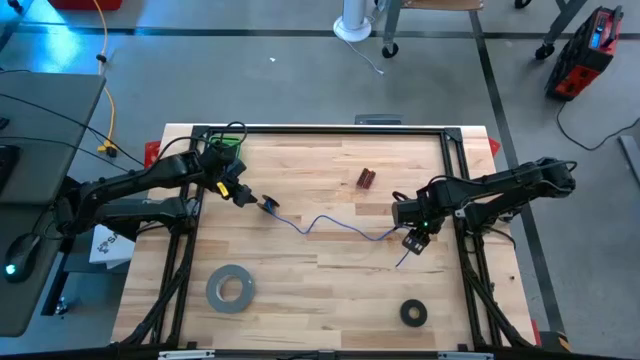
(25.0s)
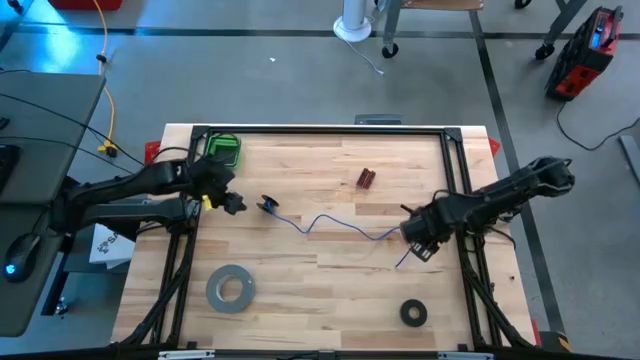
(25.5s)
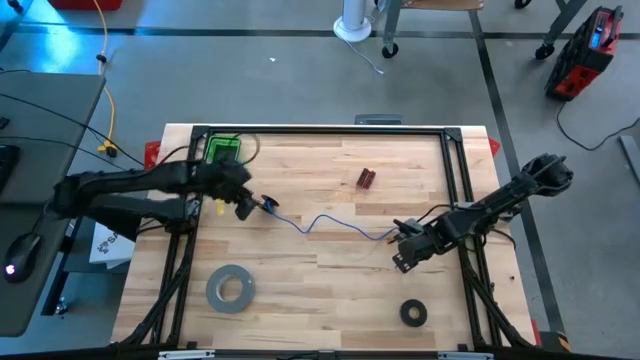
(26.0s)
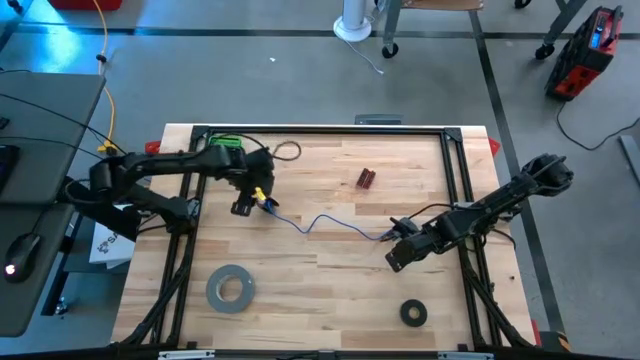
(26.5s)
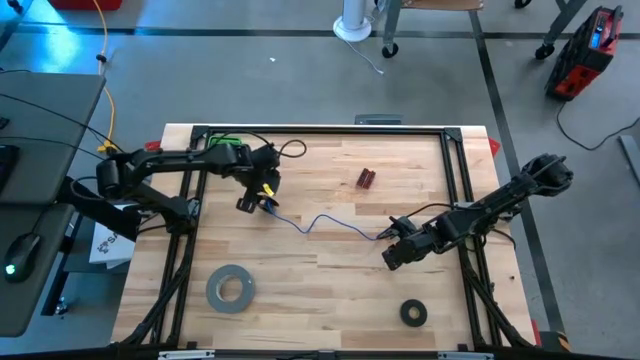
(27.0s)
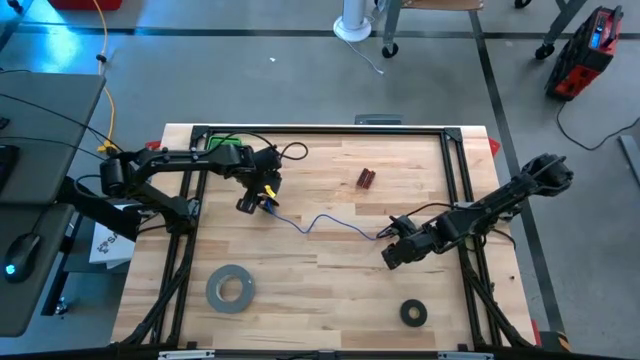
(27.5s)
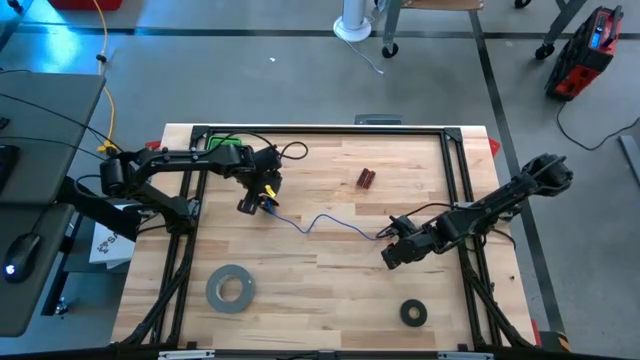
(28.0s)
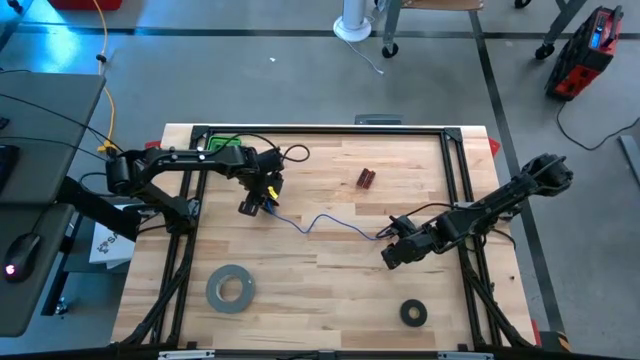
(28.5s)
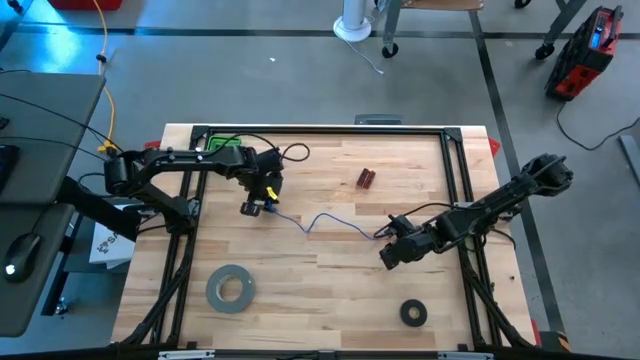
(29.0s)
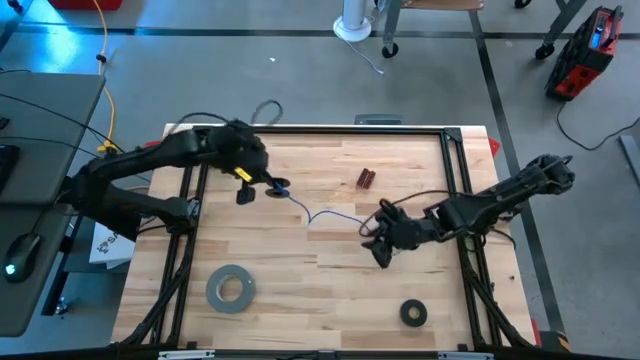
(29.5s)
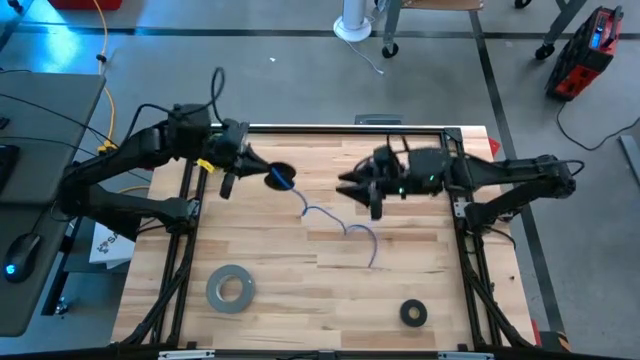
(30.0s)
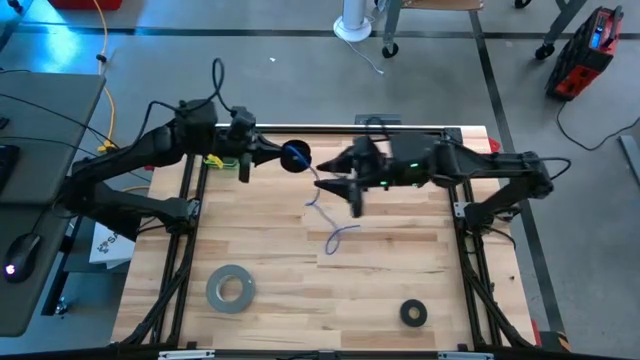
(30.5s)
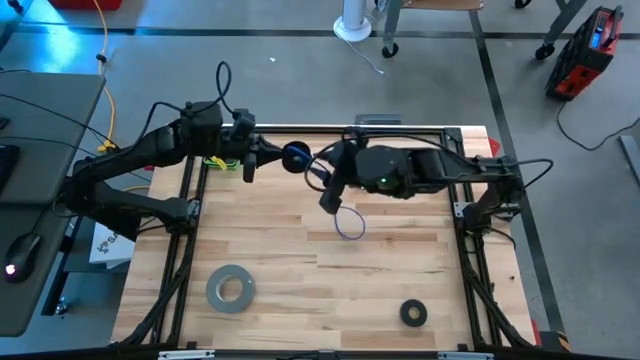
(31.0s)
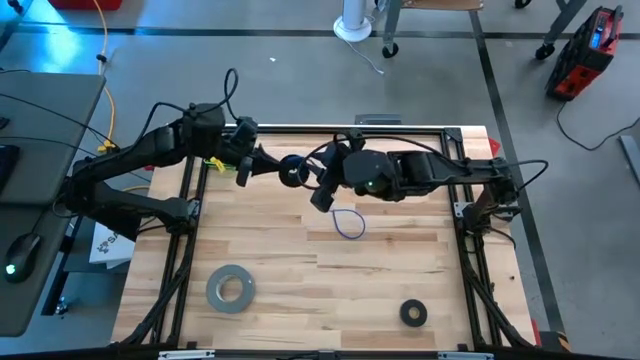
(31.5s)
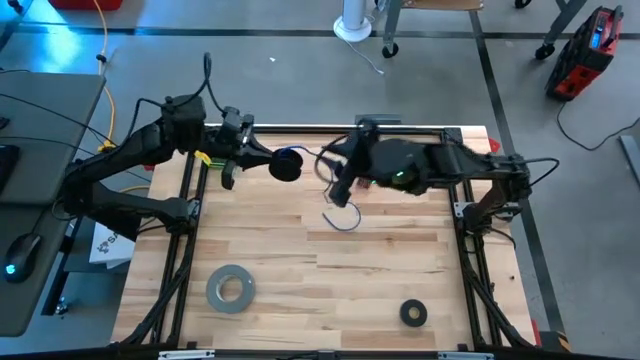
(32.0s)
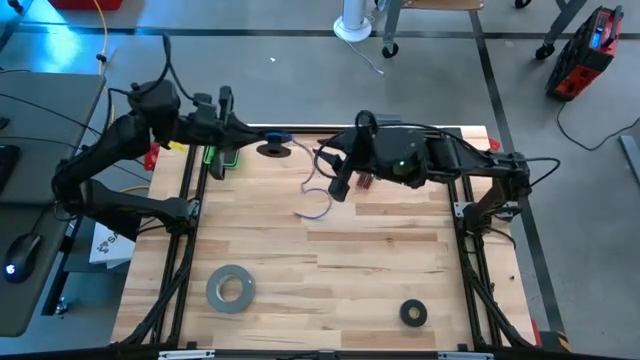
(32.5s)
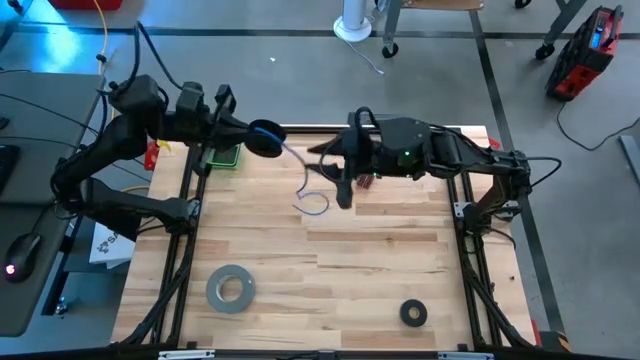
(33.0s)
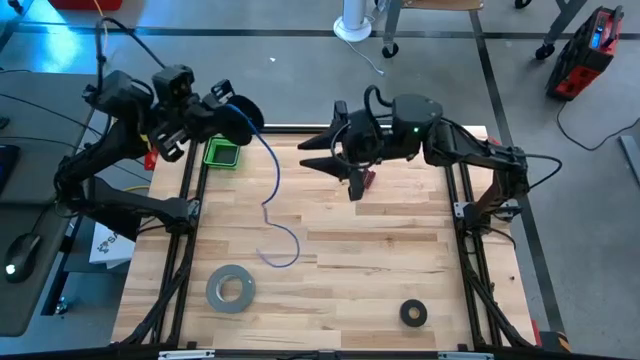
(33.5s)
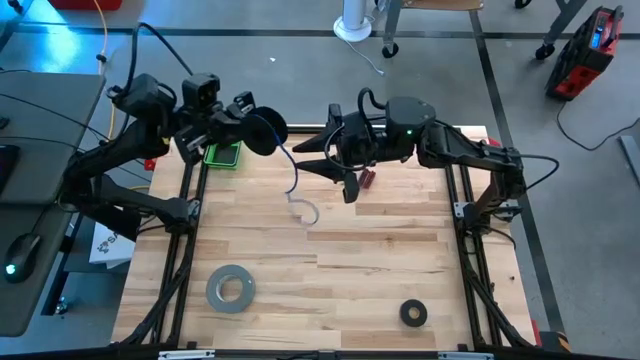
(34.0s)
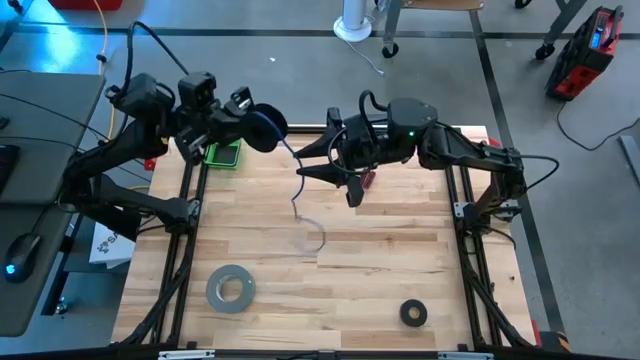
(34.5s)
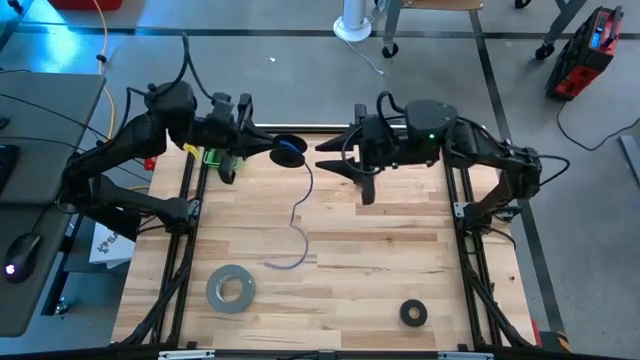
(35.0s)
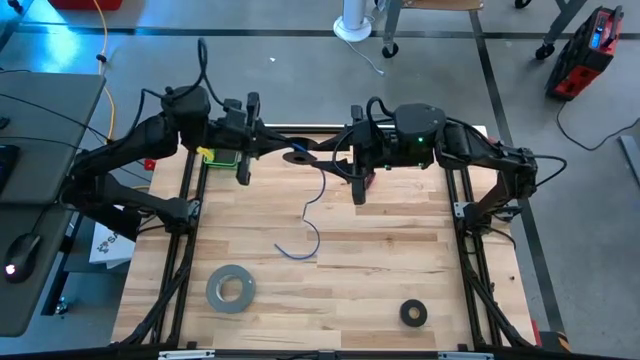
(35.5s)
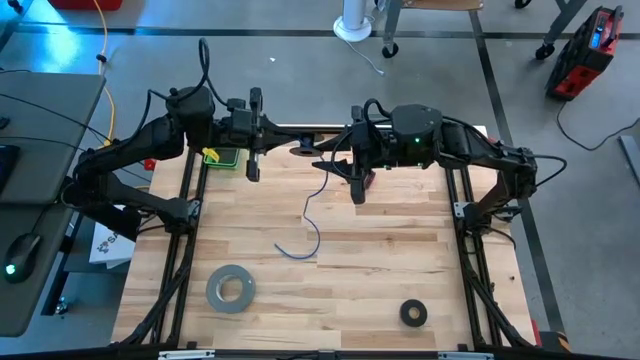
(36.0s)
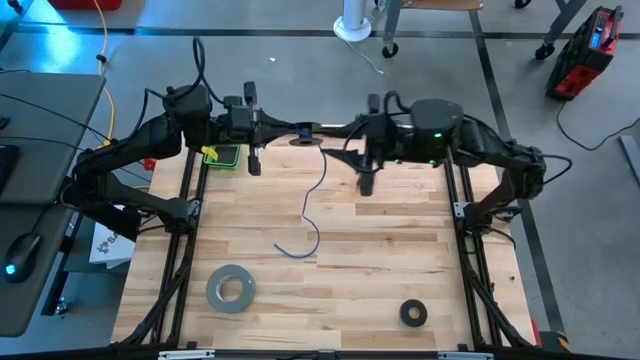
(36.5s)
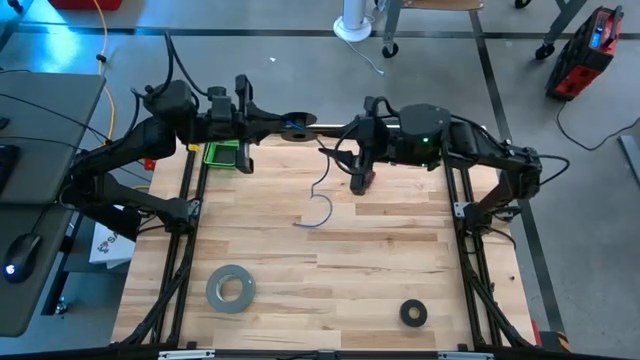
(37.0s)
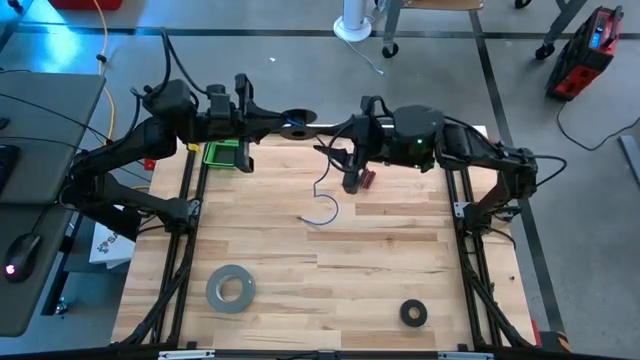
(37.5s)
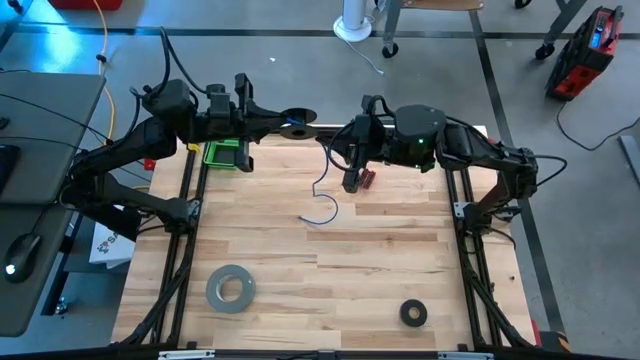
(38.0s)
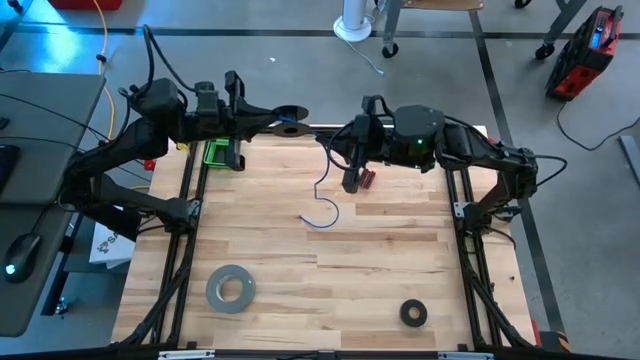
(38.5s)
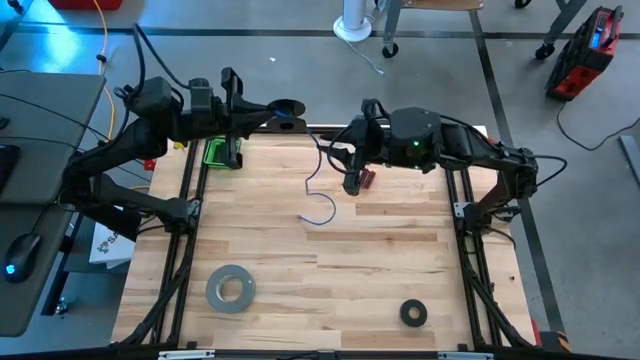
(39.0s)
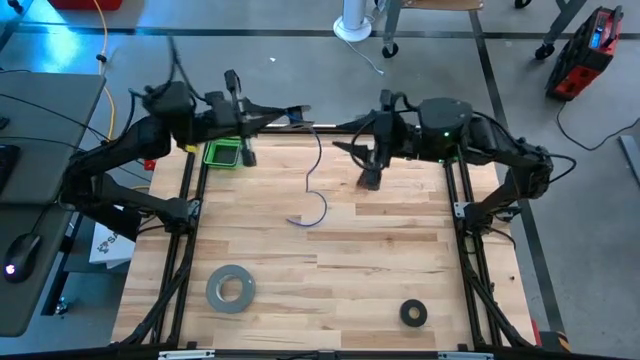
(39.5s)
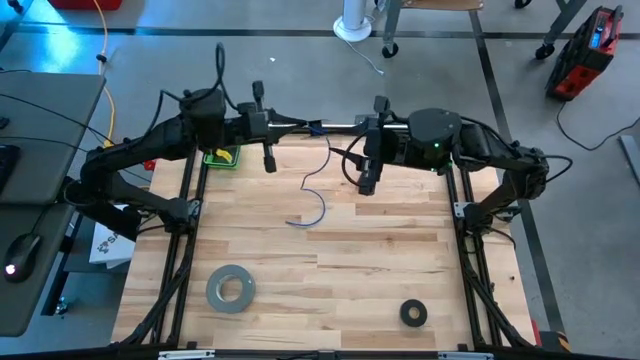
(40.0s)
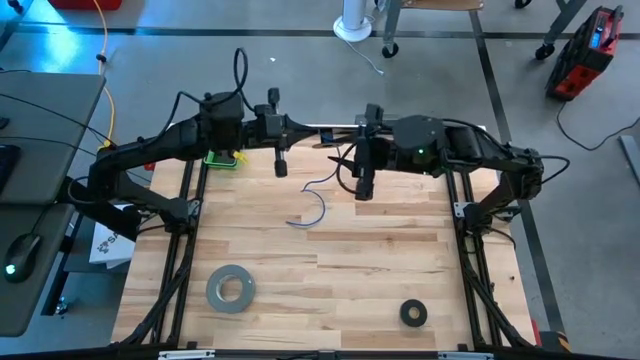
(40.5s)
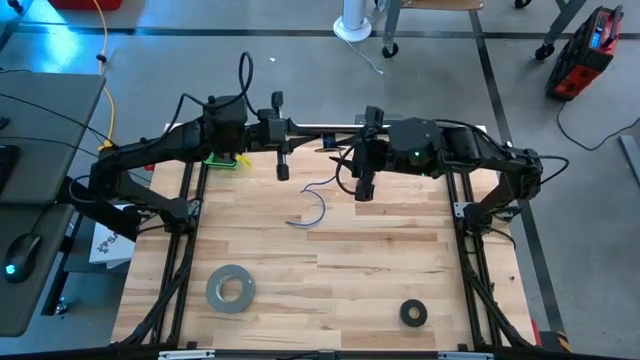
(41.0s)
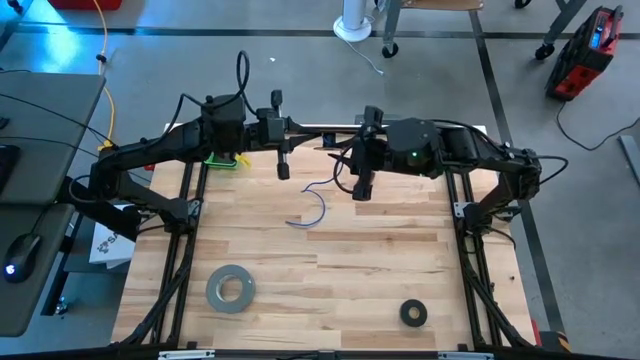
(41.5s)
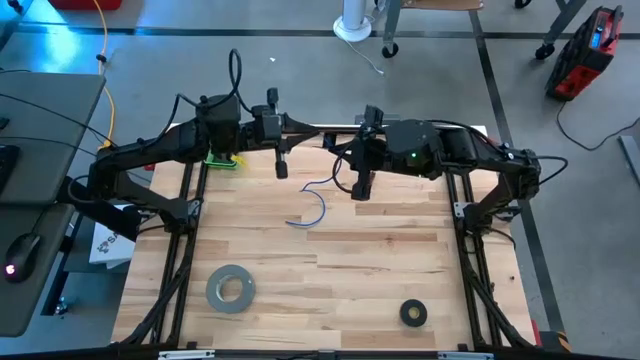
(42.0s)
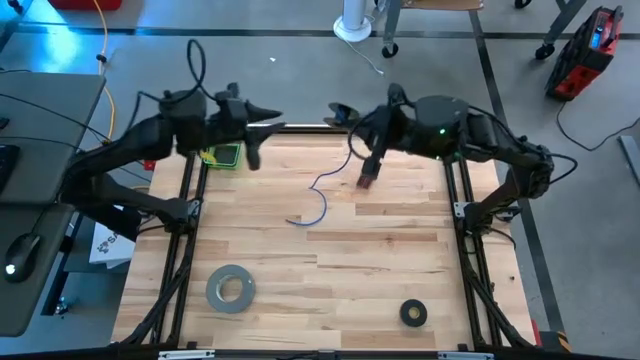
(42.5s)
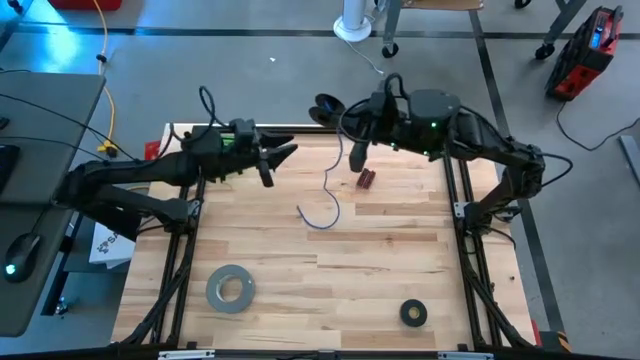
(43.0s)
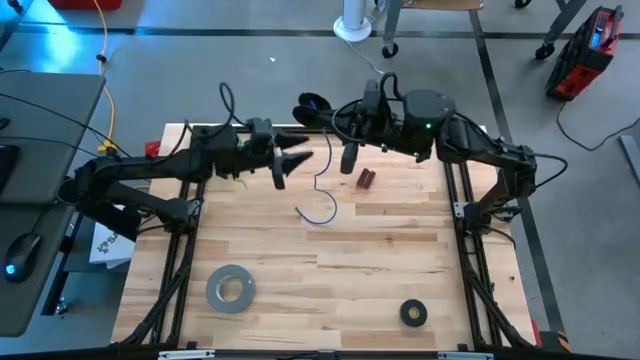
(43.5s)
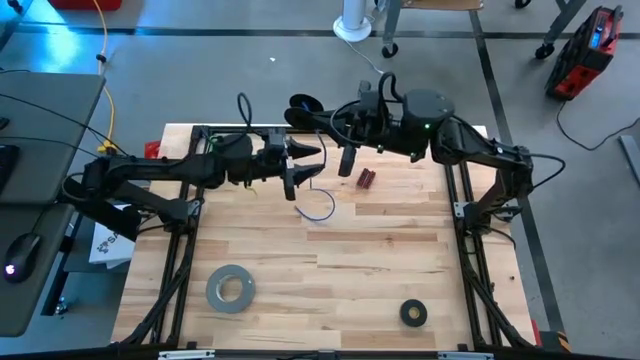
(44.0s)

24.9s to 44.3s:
Task: Coil cords
Coil the blue wire onto a spool
